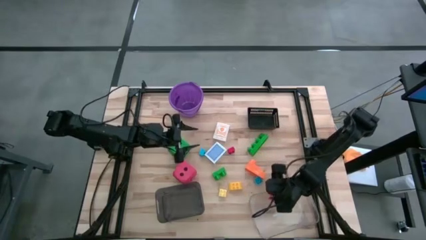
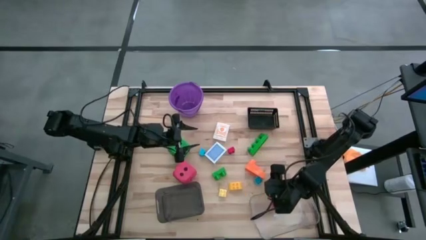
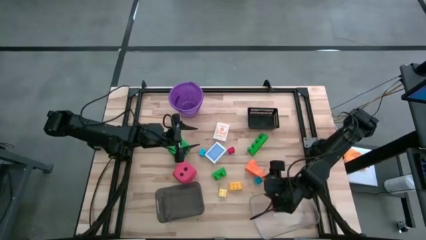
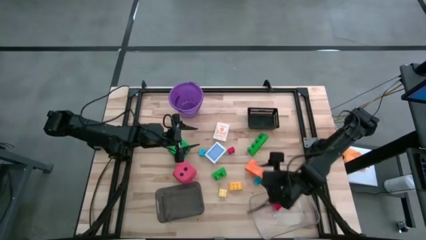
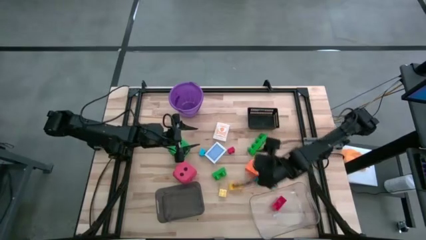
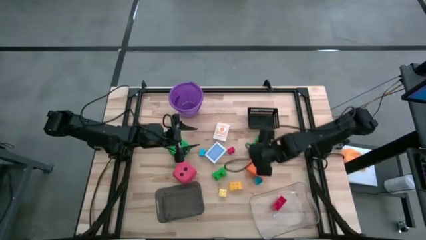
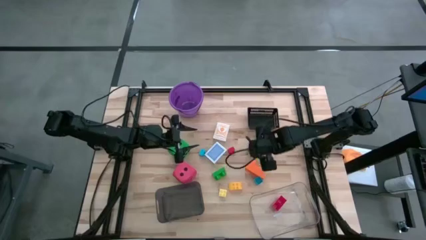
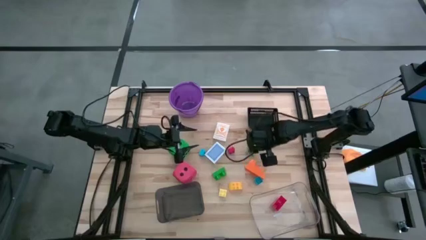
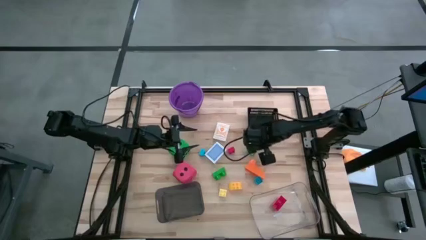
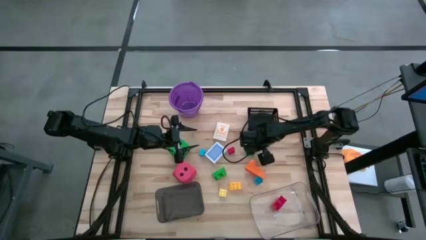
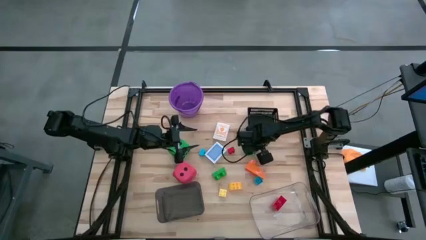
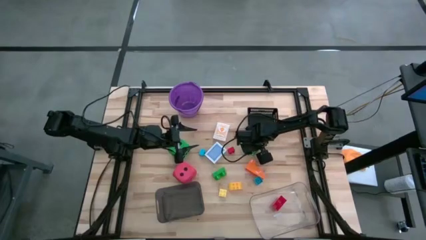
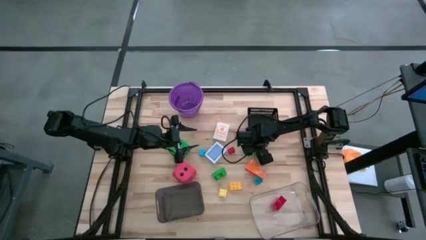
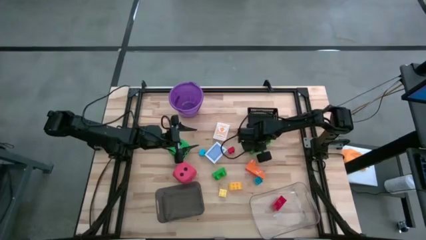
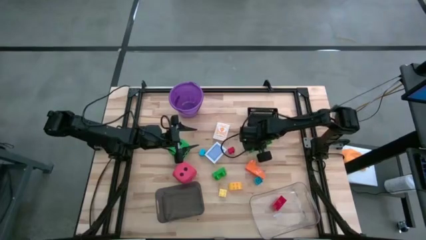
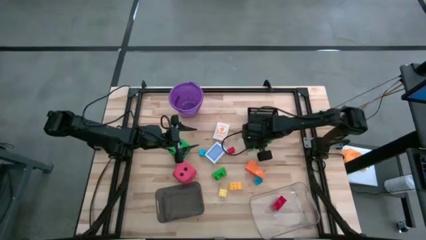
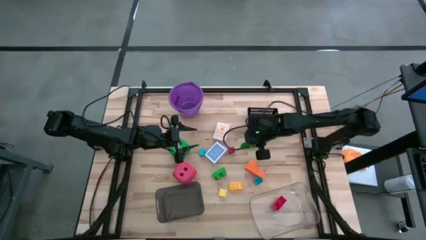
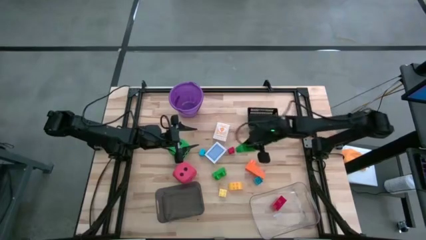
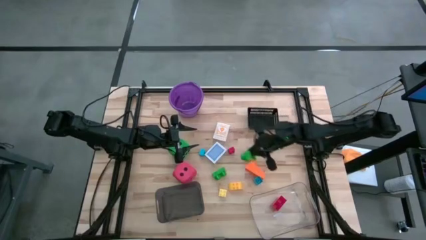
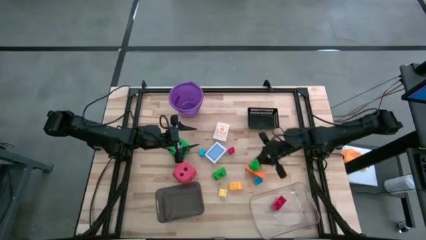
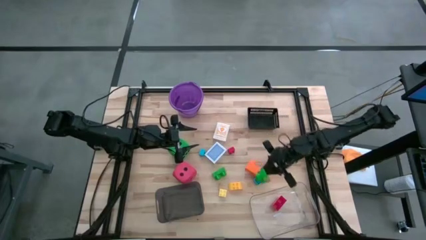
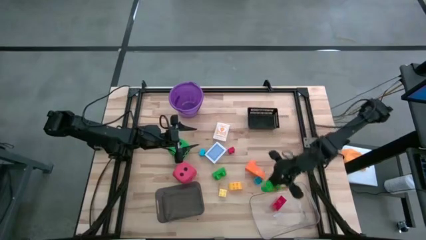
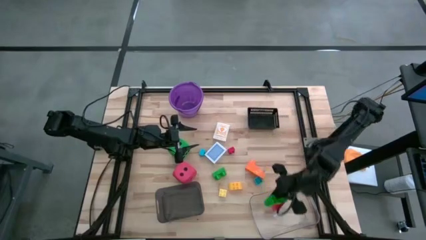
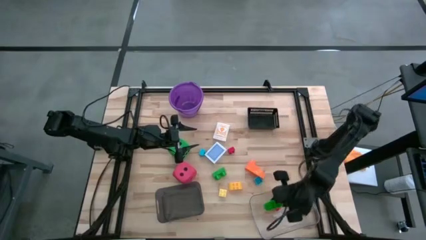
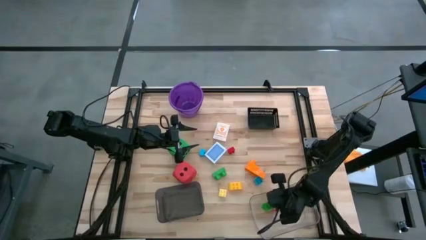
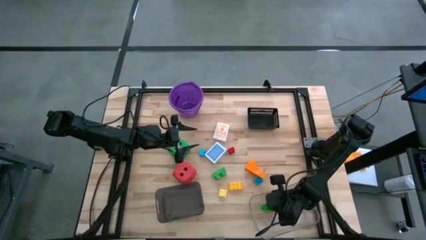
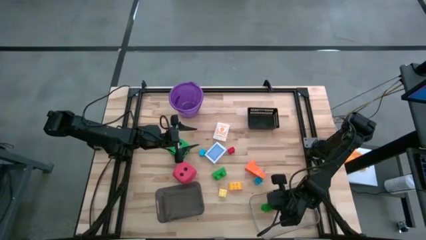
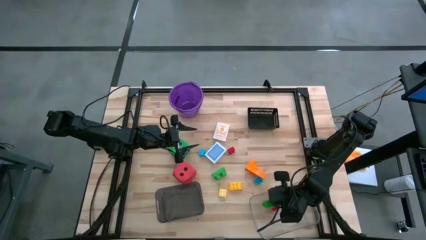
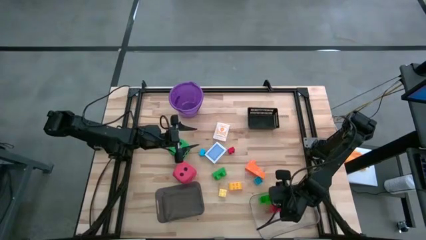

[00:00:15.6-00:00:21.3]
Task: Pick & Place Toys
Put the right large green game piece into the transparent bin

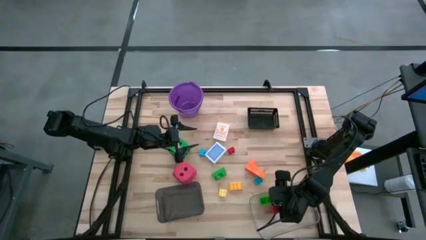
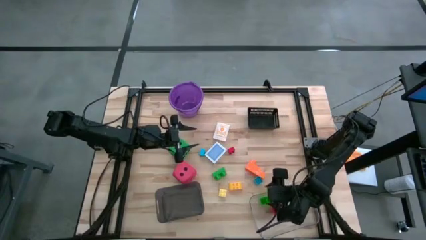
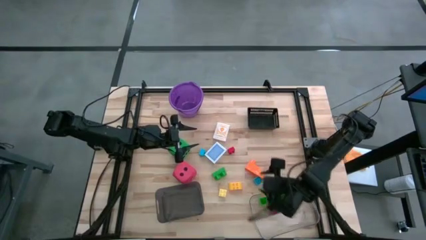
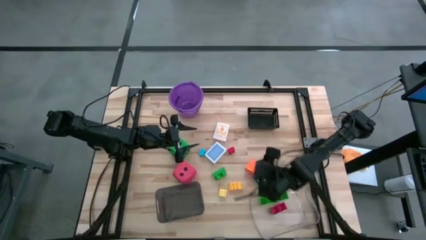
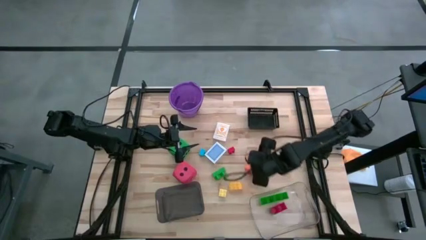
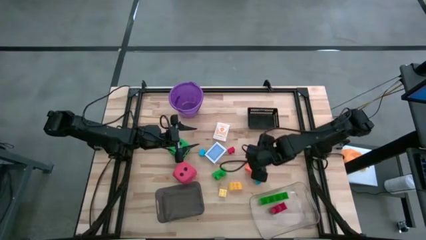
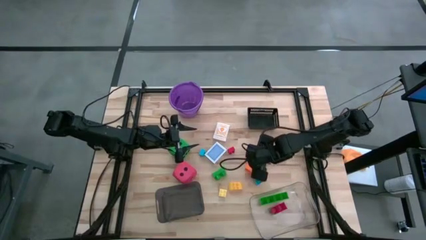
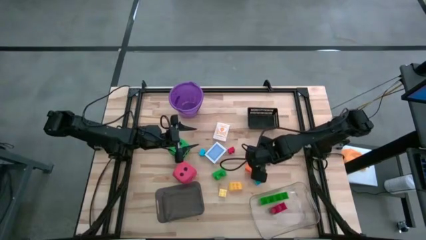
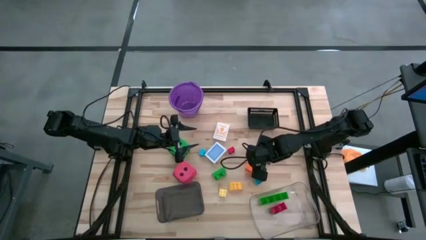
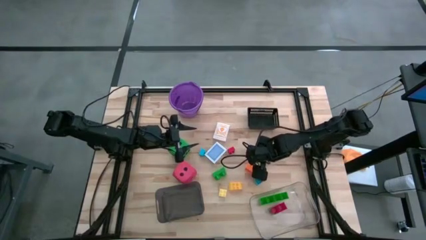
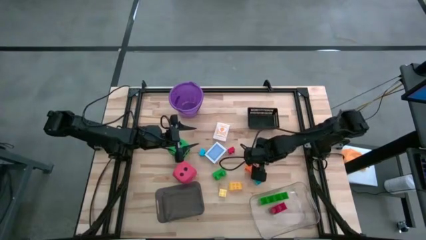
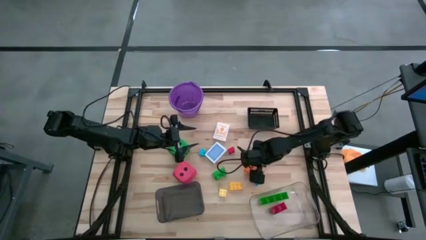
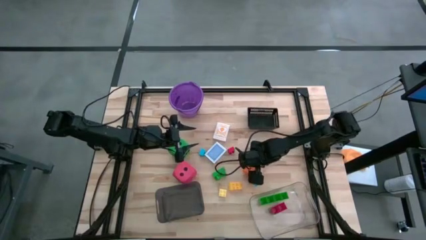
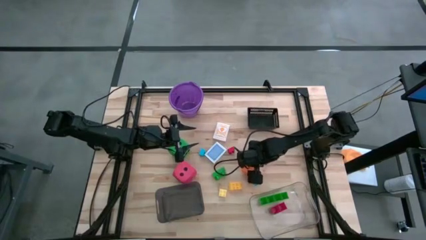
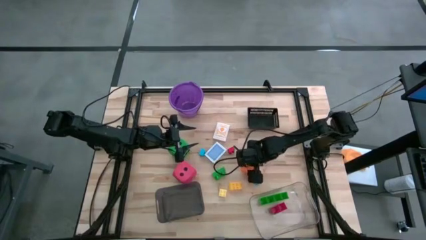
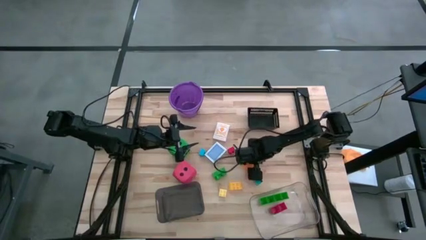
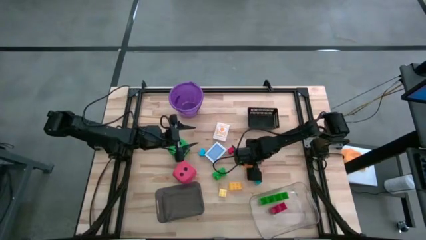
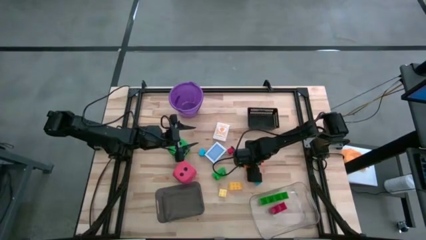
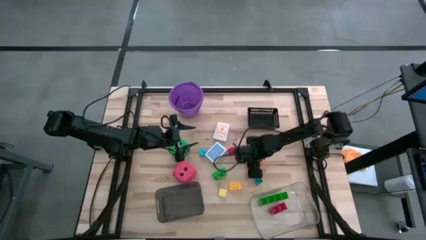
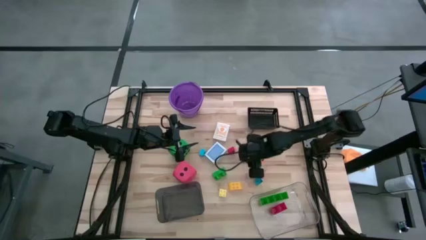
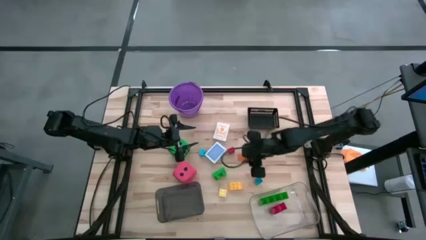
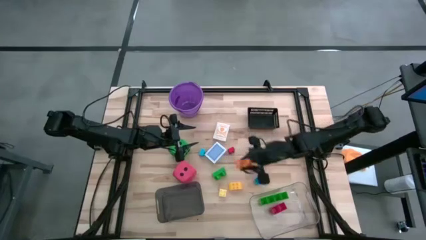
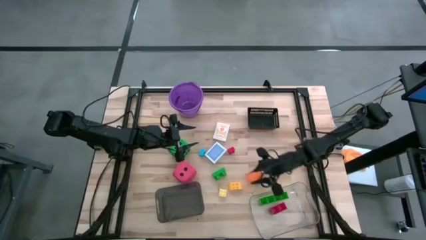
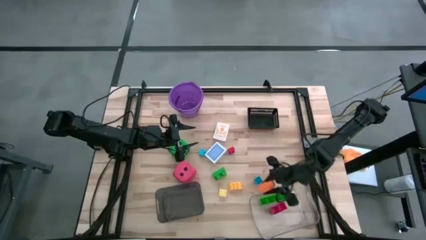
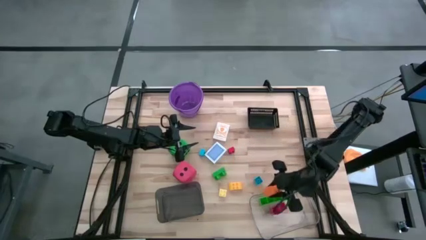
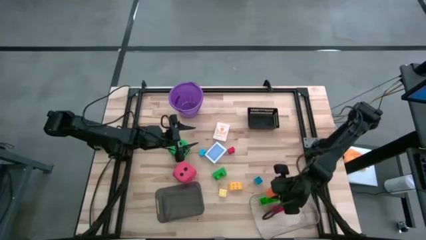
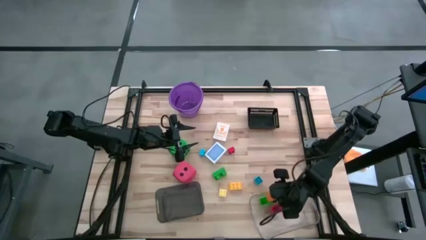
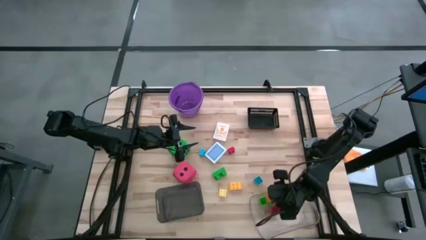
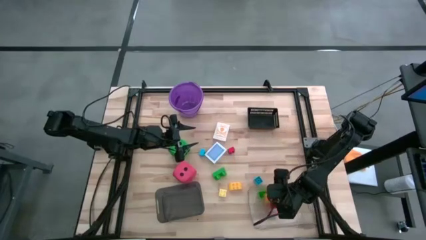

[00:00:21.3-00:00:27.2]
Put the large orange game piece into the transparent bin

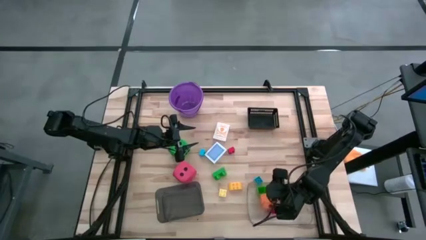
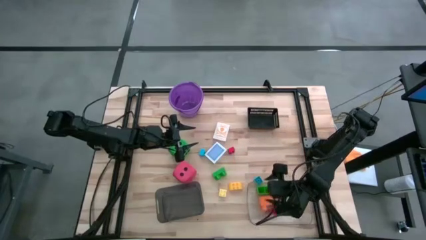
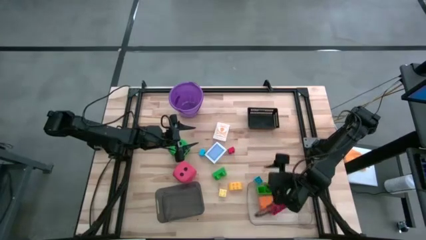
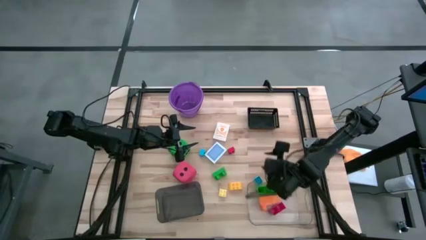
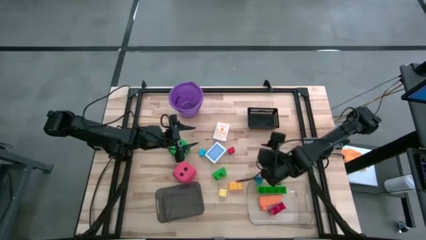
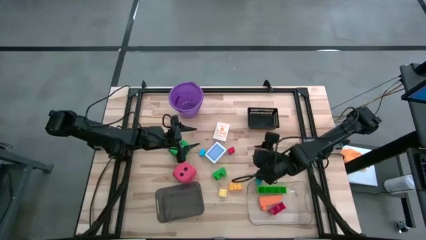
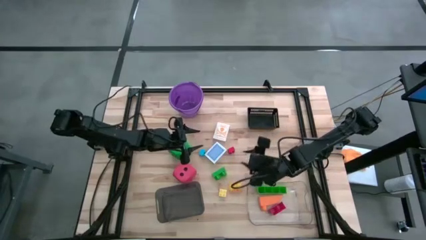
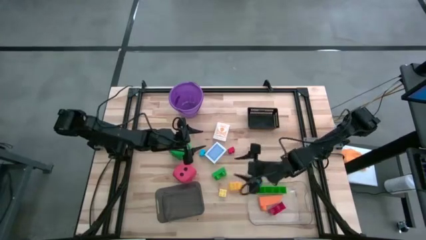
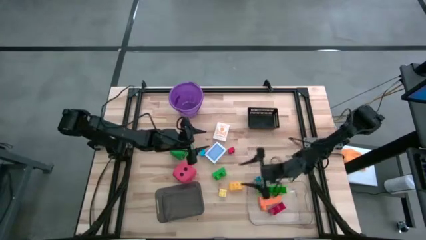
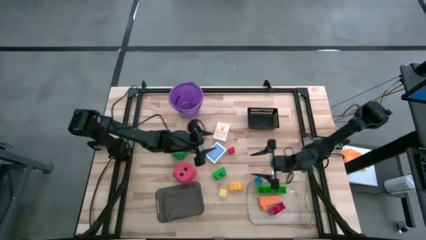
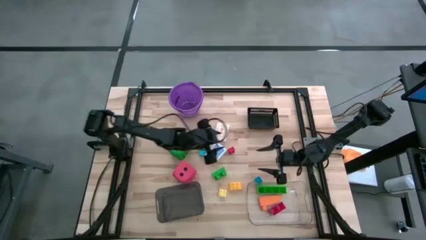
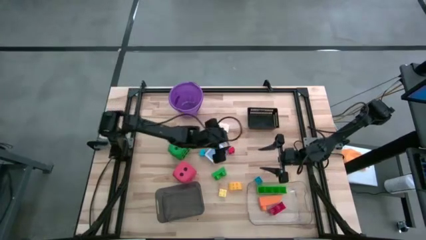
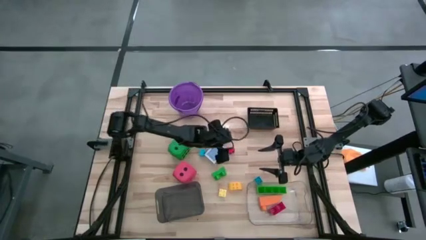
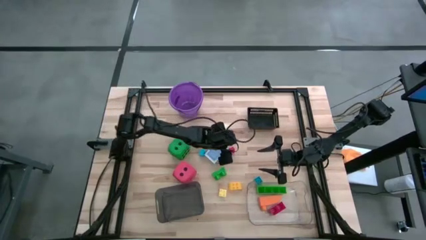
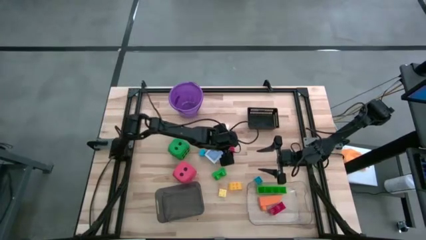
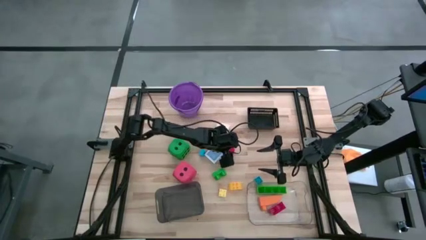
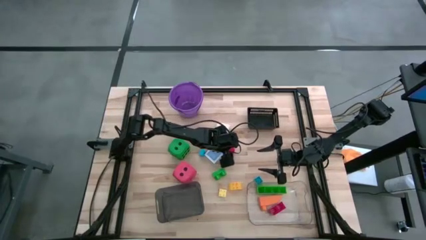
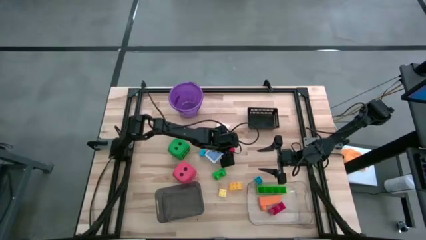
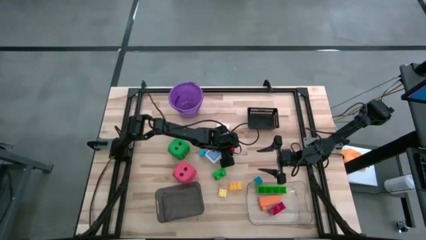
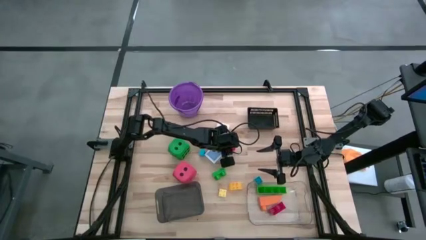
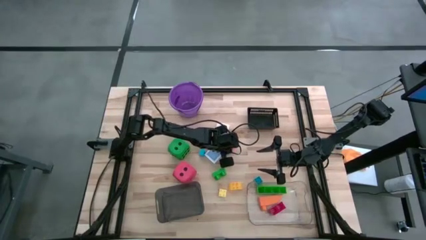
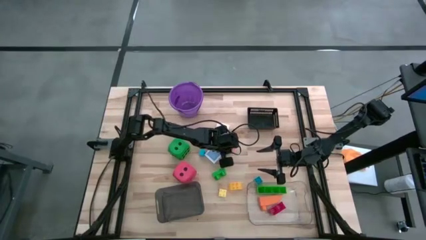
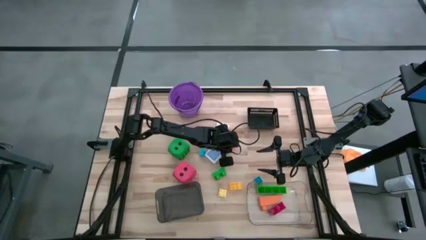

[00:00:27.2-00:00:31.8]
Put the small red game piece into the transparent bin

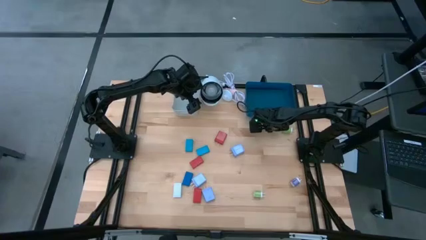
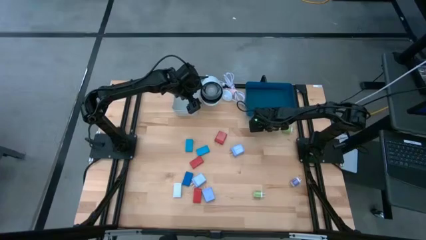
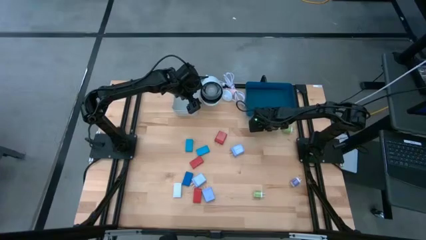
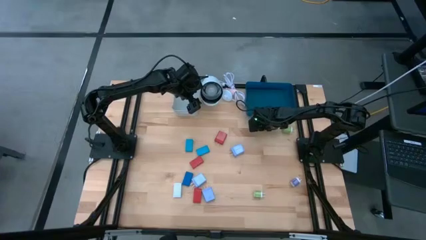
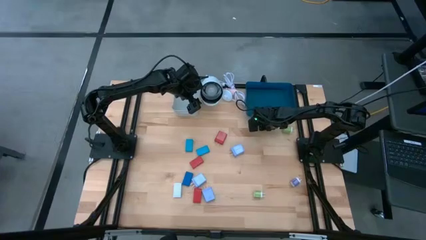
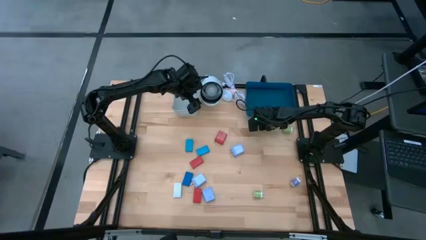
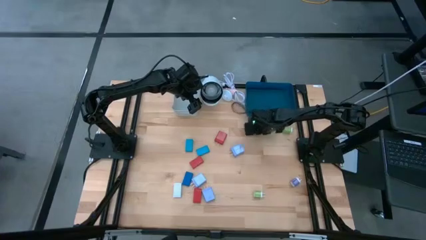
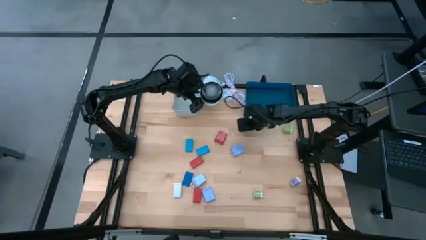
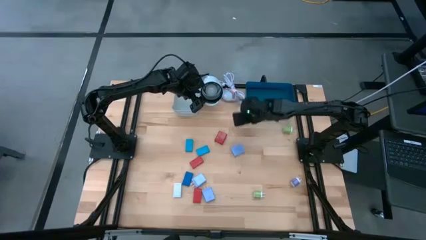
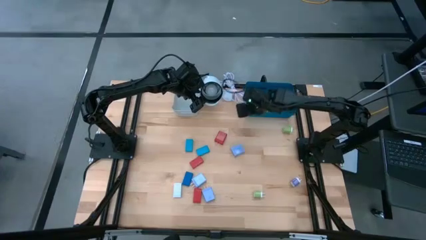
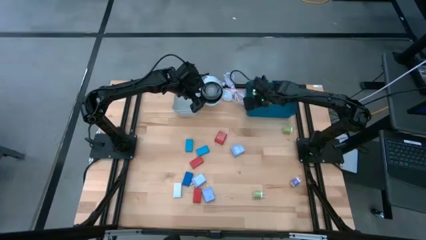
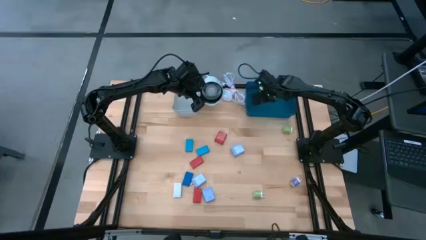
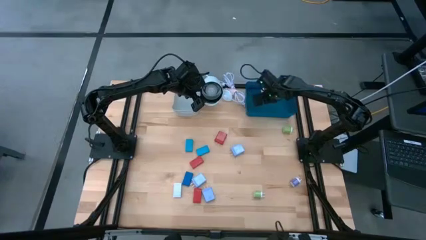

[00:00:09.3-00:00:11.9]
Task: Pick & Place Office items
Put the light pink charger adapter into the blue bin
